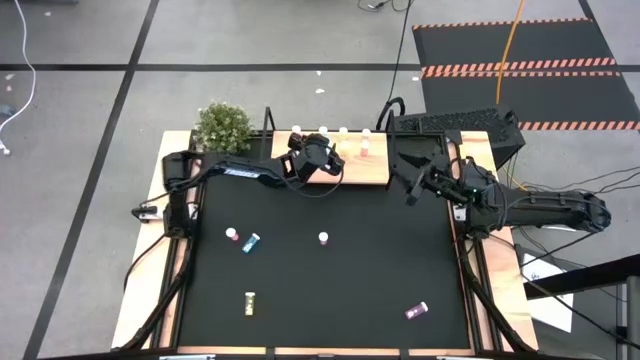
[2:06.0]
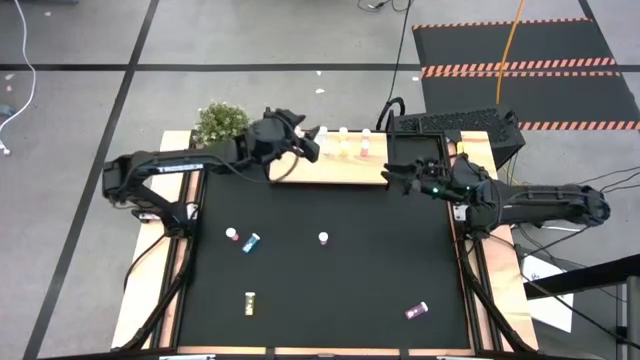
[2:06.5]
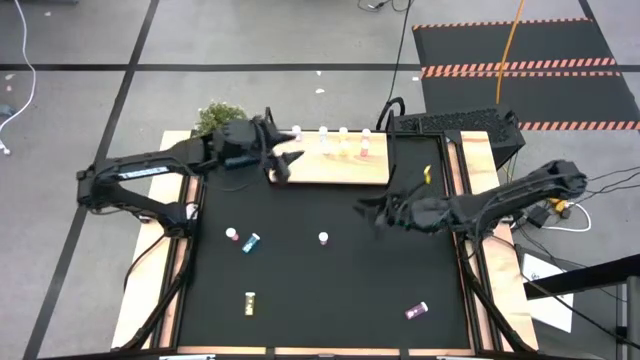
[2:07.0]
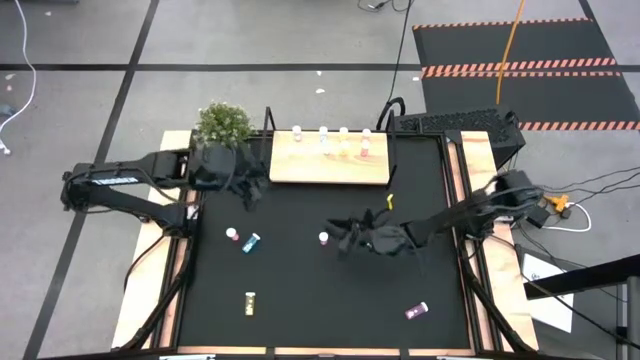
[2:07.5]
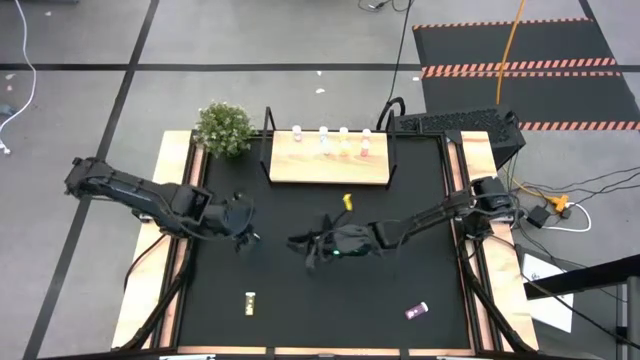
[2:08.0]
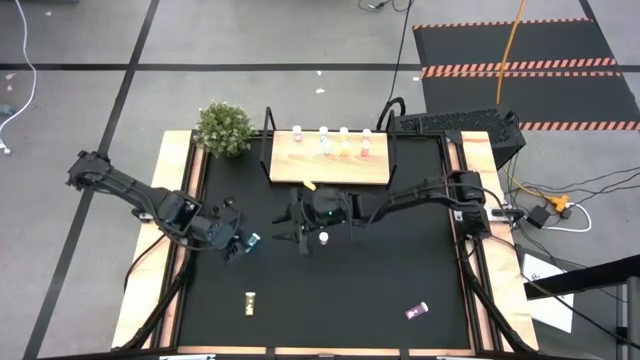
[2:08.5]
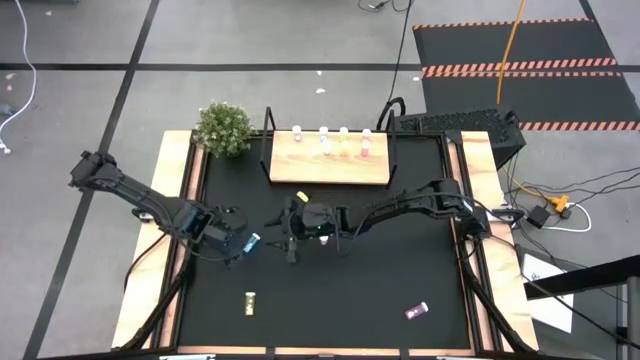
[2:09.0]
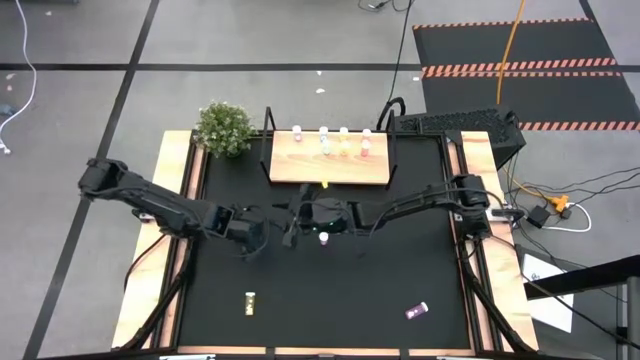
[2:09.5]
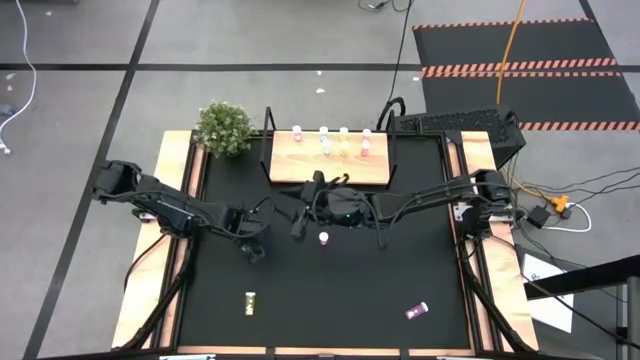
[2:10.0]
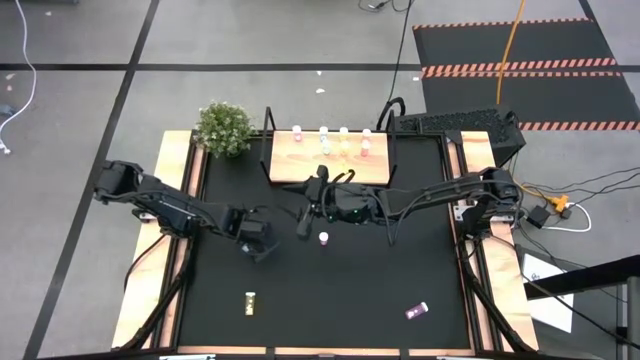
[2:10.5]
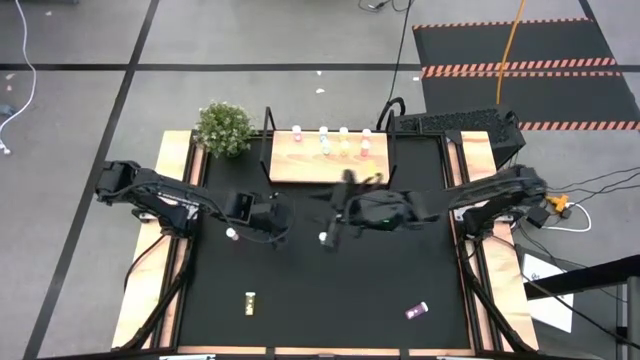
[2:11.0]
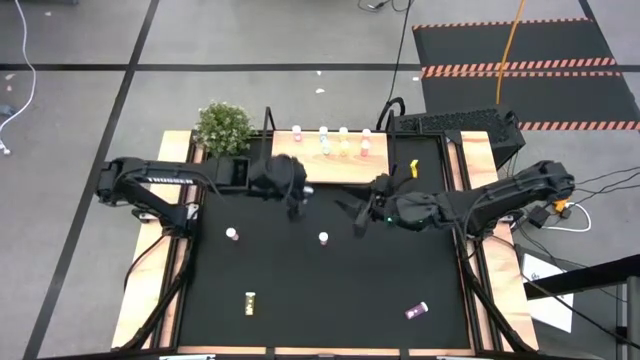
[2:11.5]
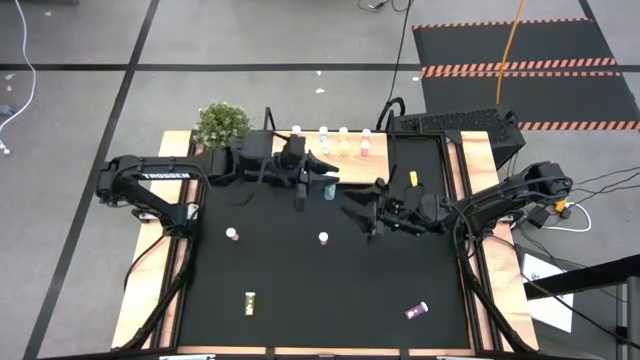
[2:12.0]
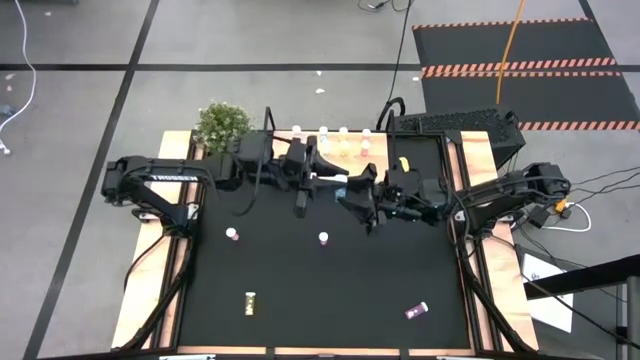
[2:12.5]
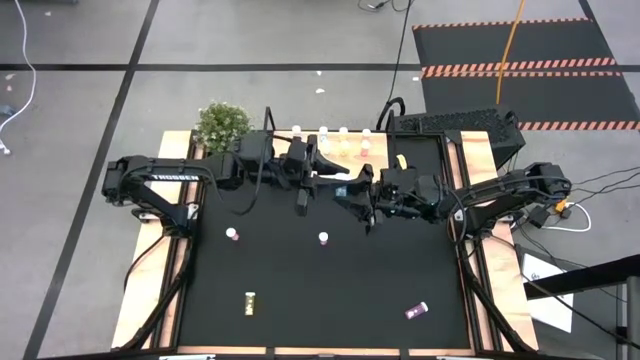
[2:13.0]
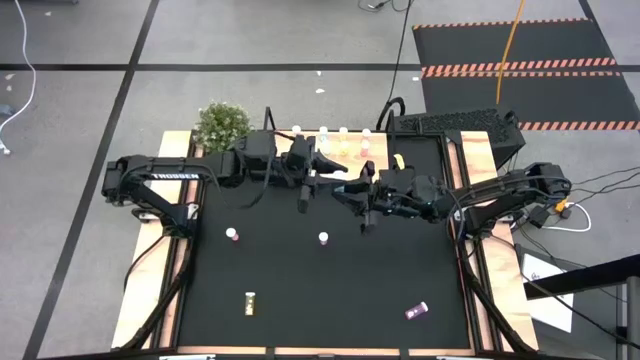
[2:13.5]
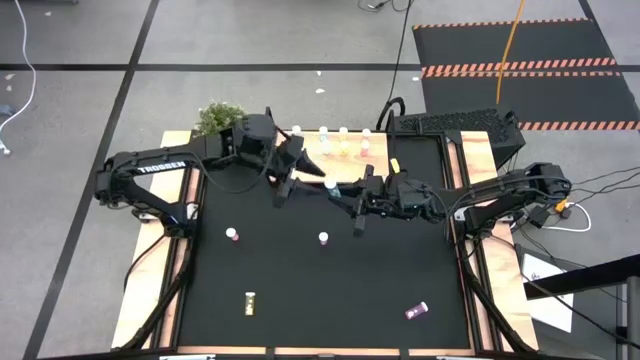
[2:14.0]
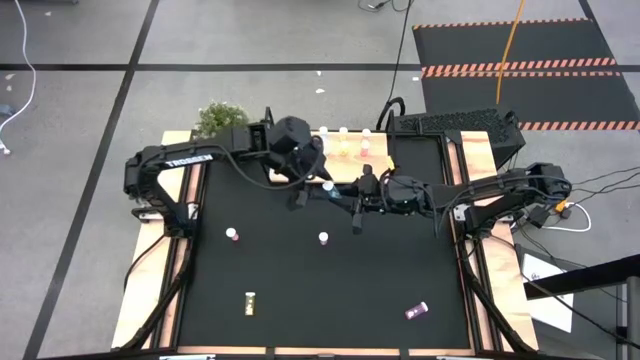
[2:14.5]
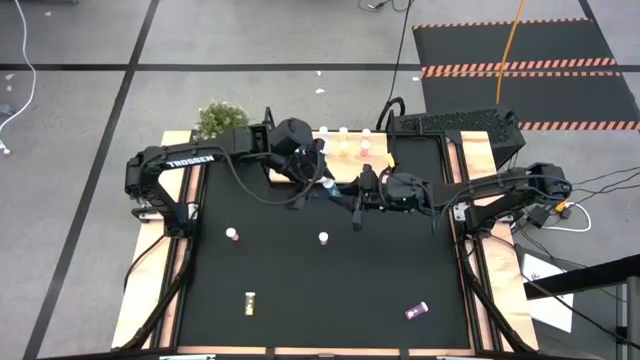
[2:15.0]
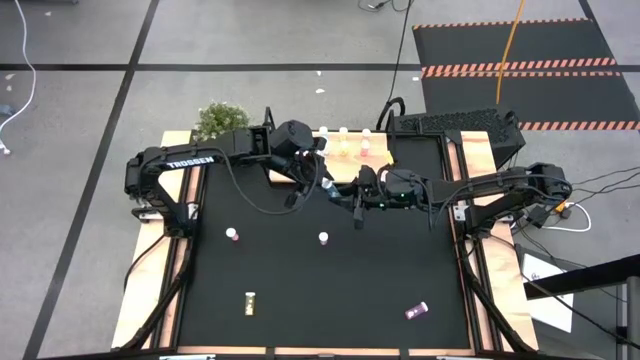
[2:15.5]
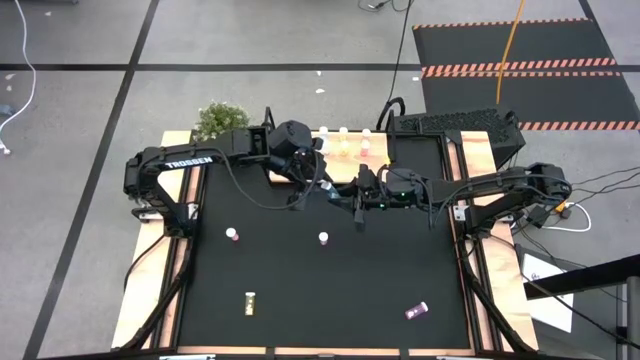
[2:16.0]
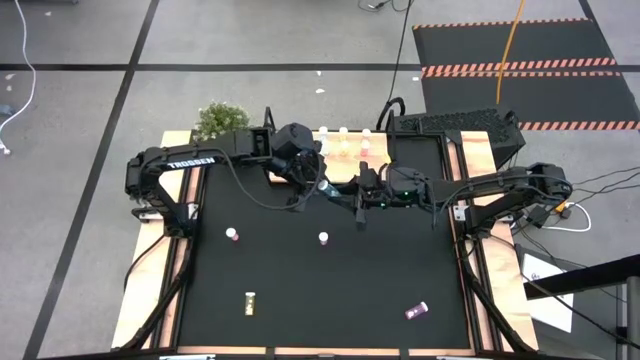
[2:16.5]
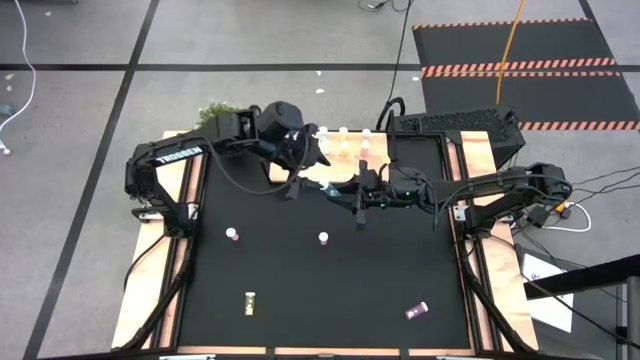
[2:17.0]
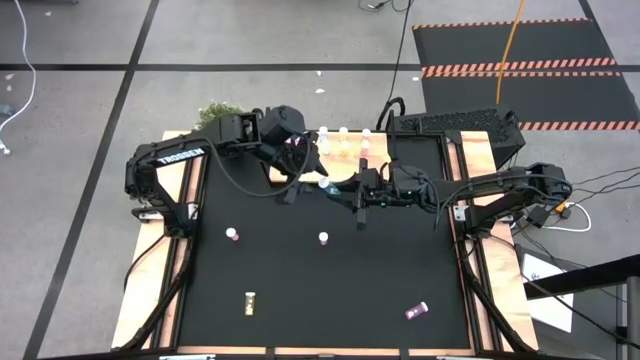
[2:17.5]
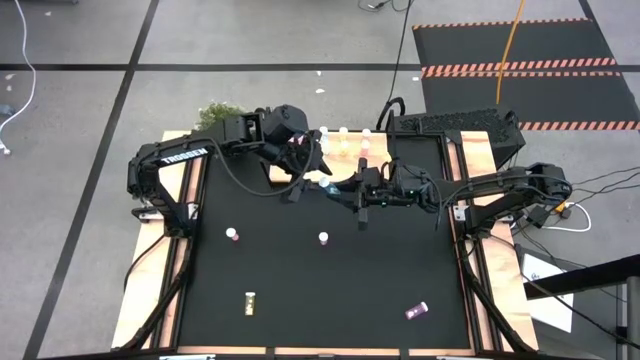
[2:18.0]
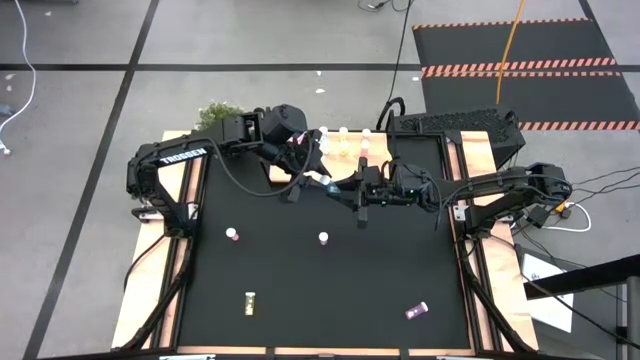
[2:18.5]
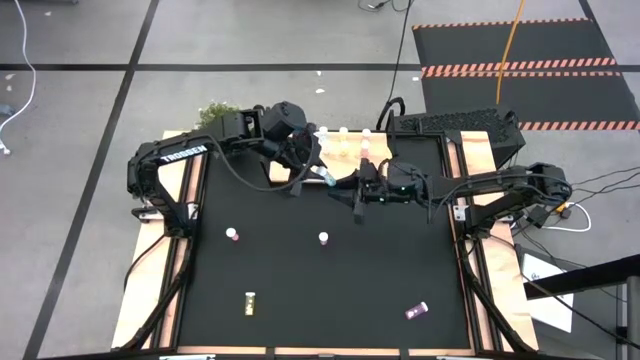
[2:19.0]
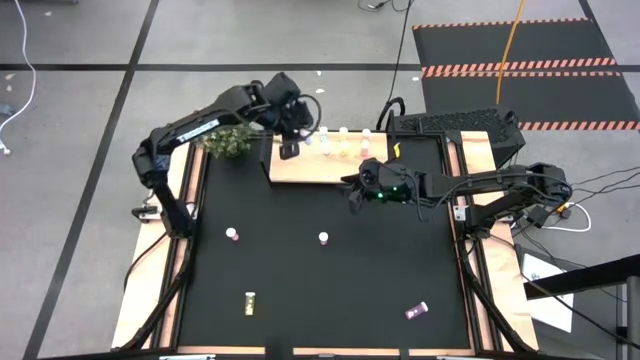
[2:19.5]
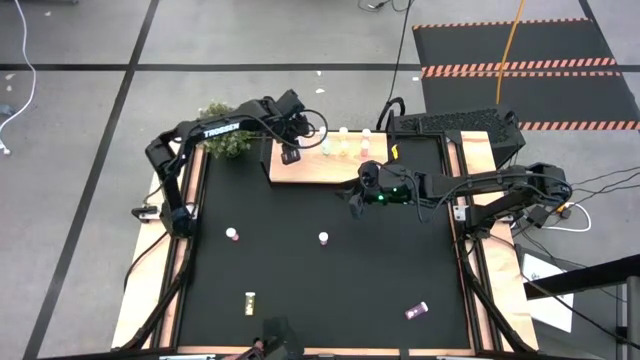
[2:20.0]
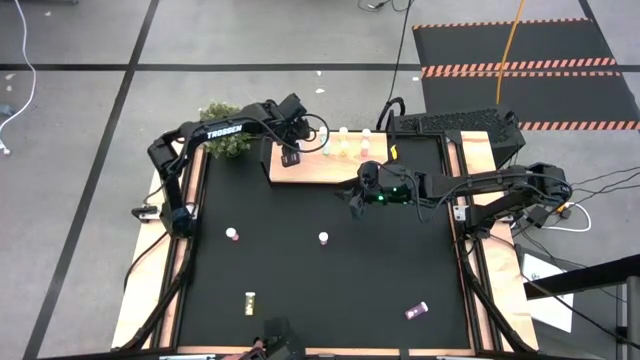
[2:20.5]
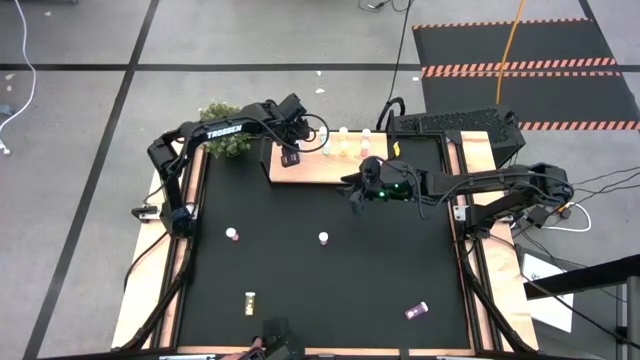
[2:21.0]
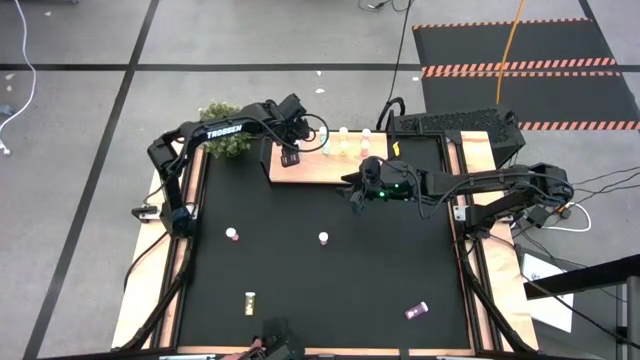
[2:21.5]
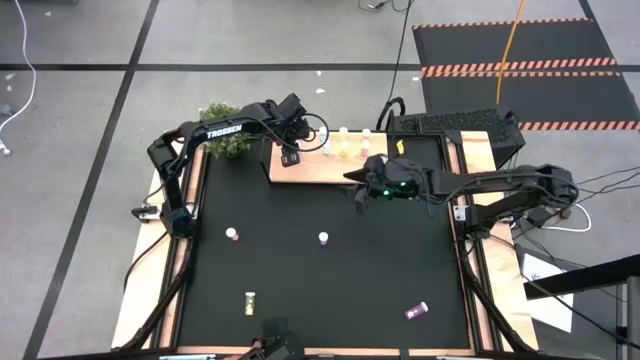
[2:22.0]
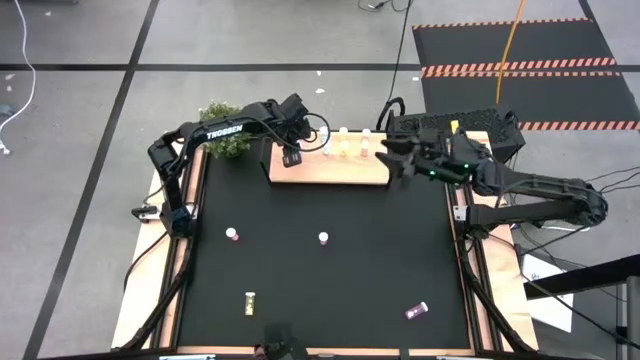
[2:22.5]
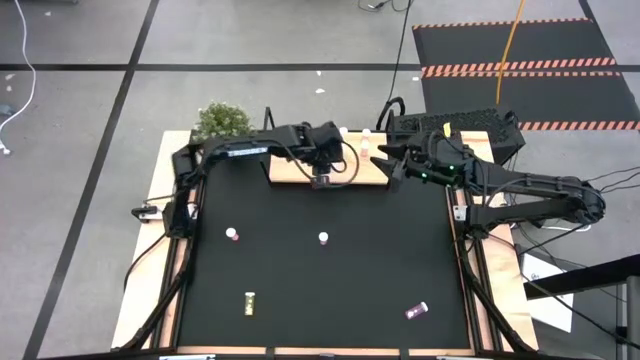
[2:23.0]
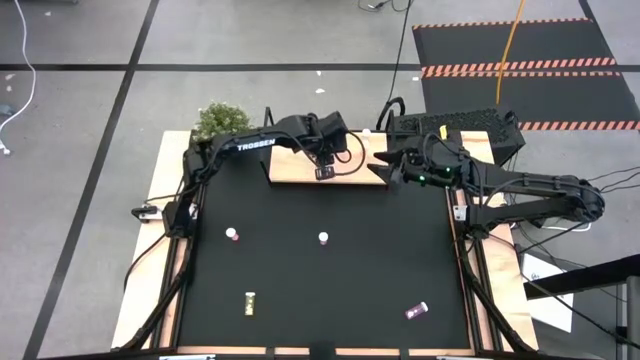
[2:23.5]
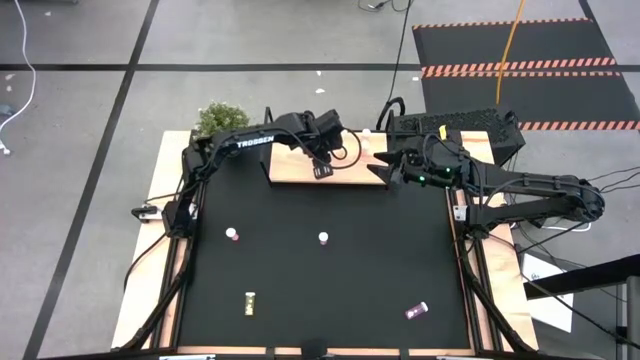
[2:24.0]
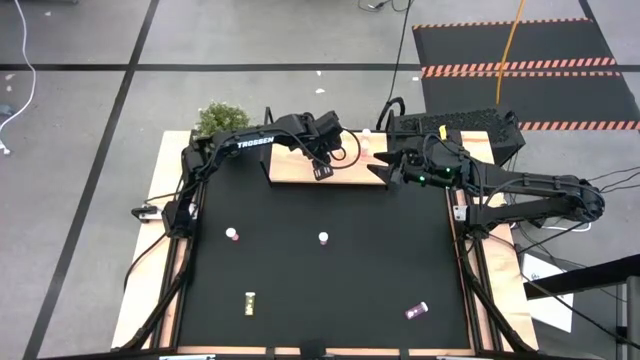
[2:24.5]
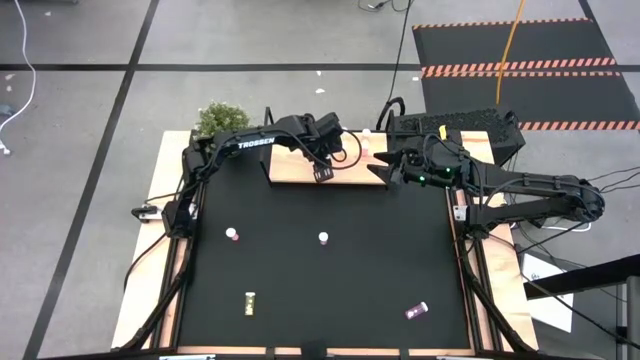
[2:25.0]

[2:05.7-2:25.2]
Task: Pick and place medicine bottles onto shelf by color
Put the blue pill bottle on the shelf aligned with the other blue pill bottles

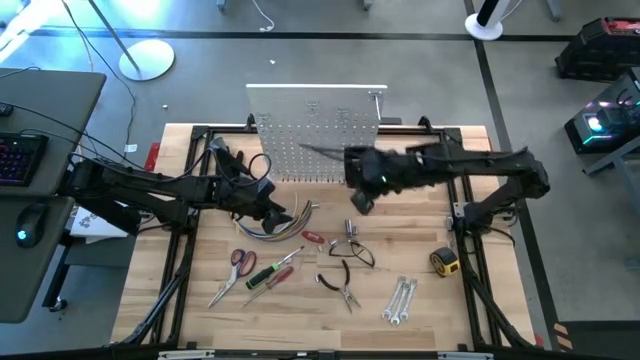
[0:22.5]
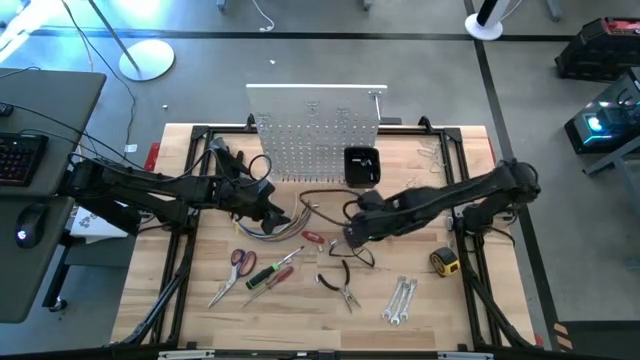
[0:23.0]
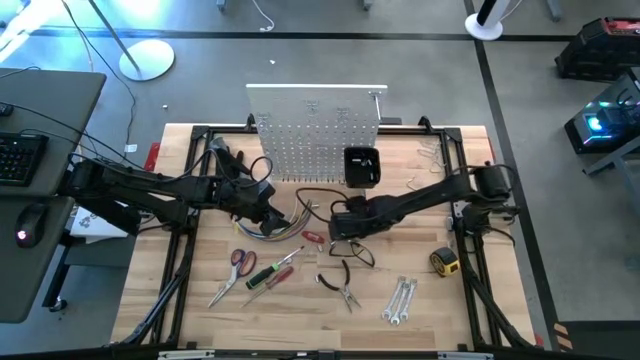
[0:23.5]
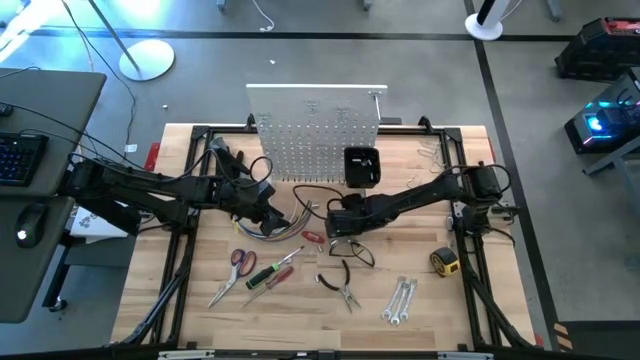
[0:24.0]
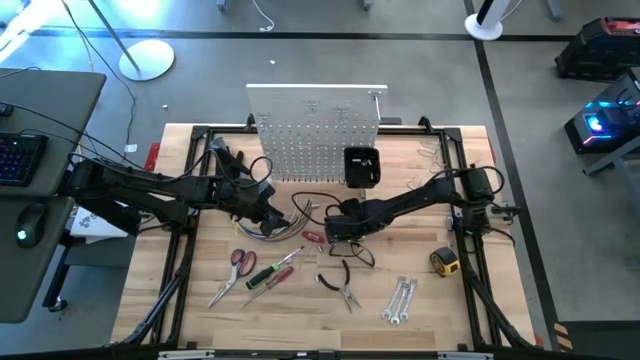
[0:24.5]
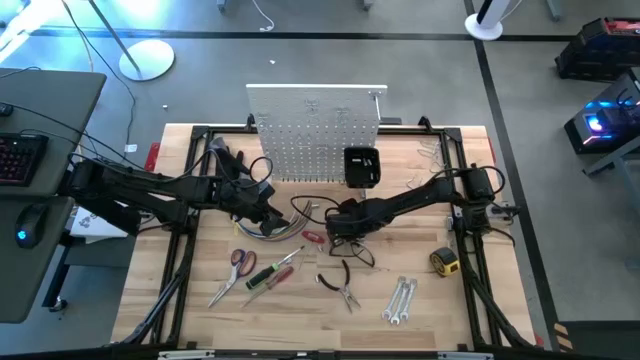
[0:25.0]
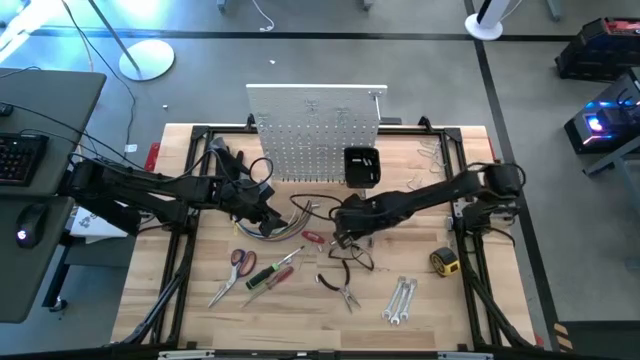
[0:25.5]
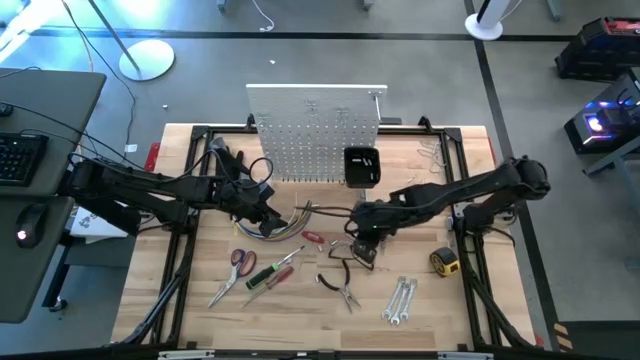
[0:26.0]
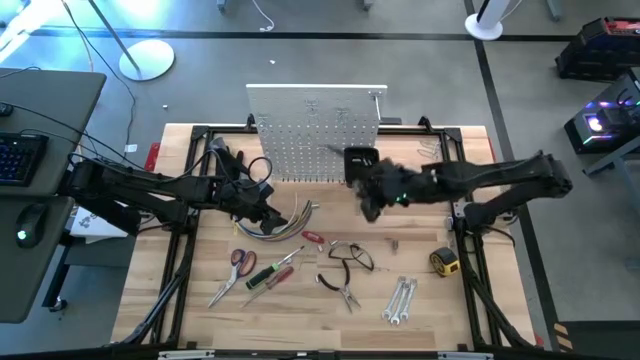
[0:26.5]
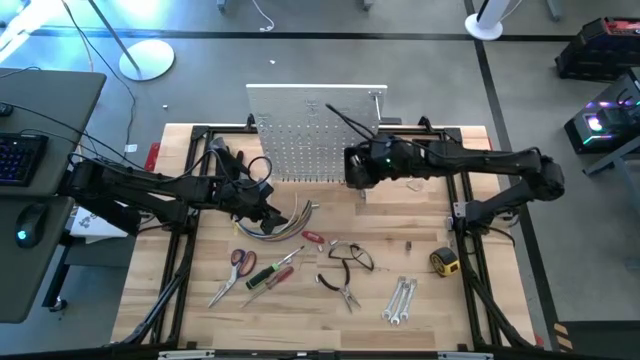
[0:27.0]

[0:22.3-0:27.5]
Task: Hang tools onto peg board
Put the socket into the black bin on the peg board
